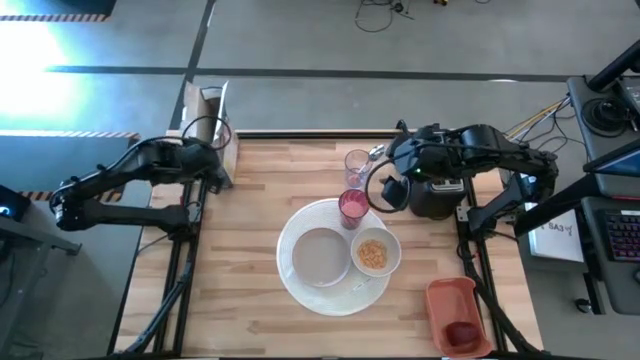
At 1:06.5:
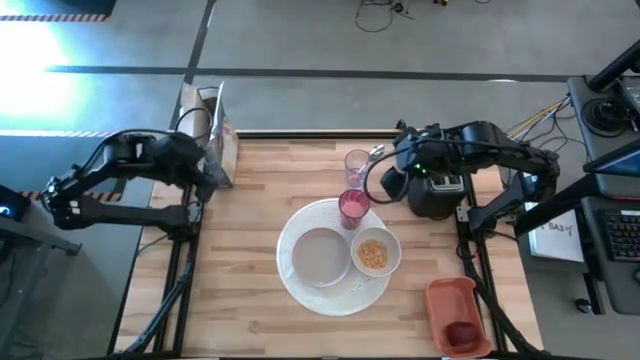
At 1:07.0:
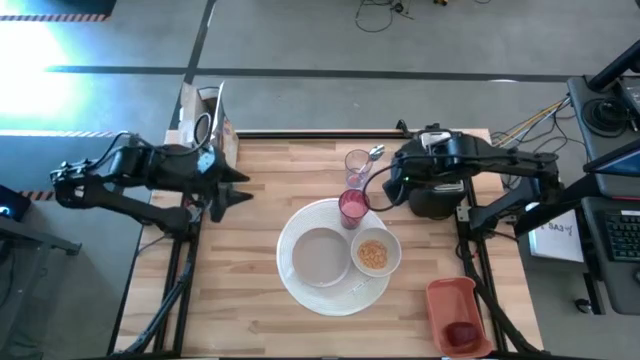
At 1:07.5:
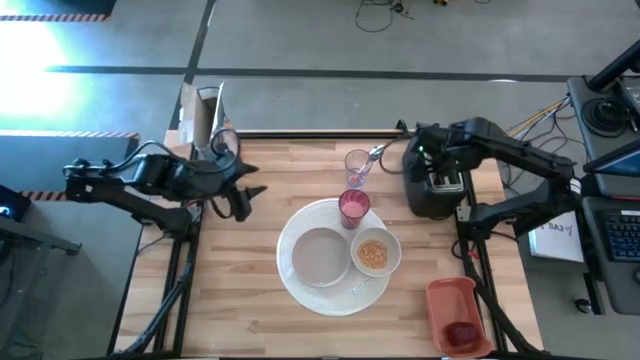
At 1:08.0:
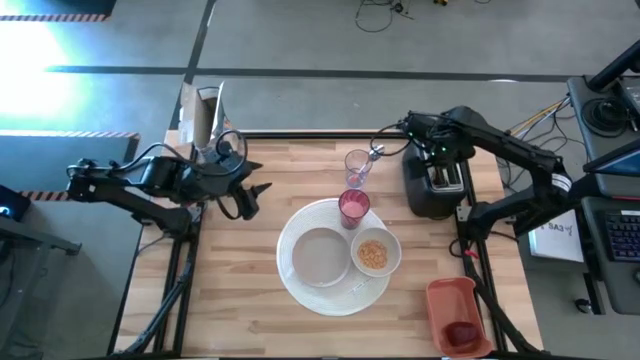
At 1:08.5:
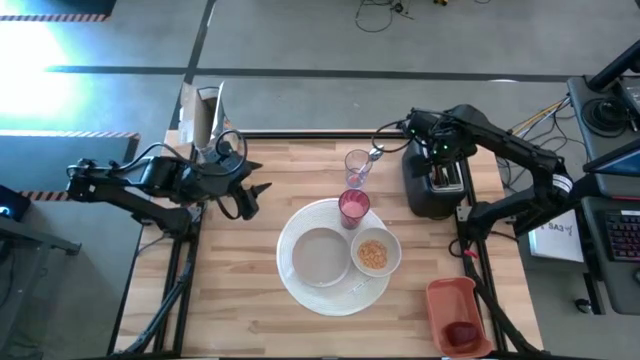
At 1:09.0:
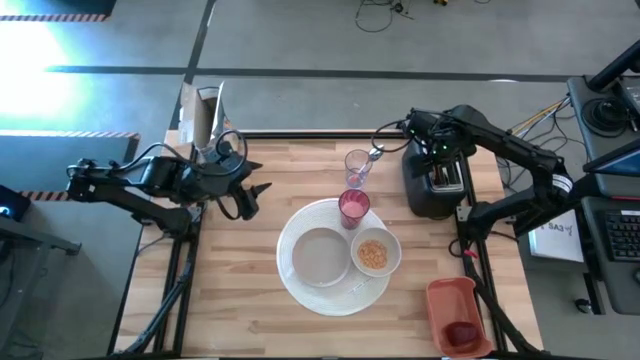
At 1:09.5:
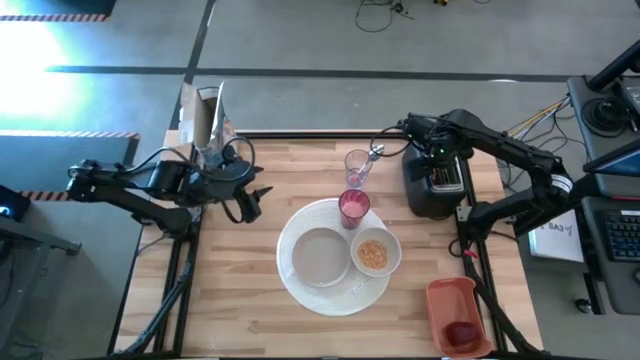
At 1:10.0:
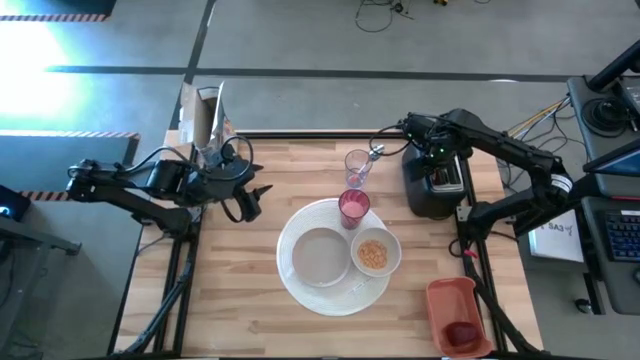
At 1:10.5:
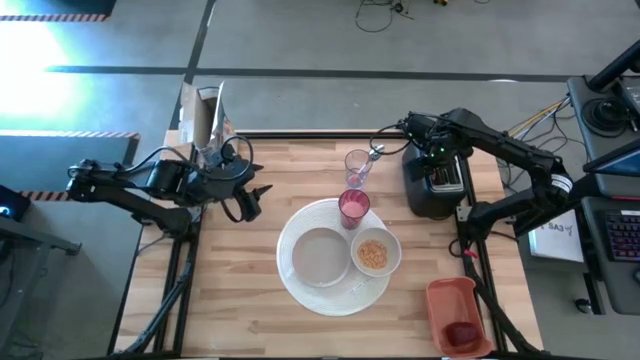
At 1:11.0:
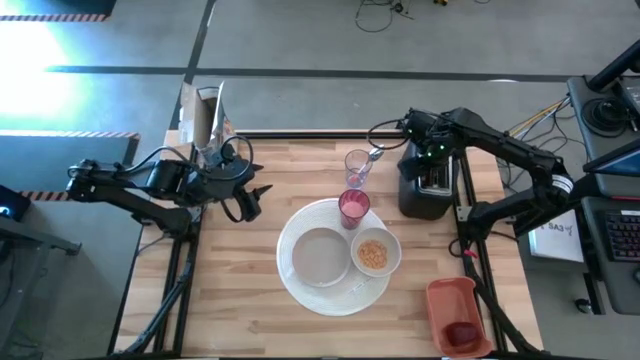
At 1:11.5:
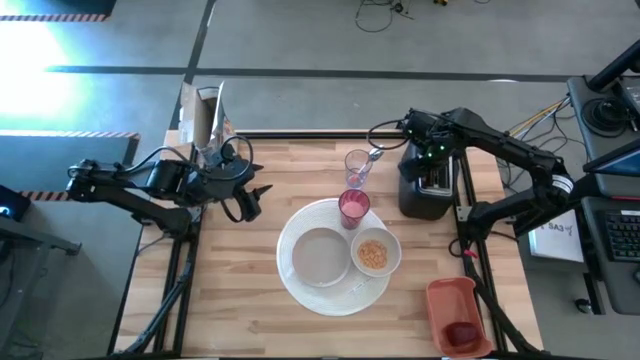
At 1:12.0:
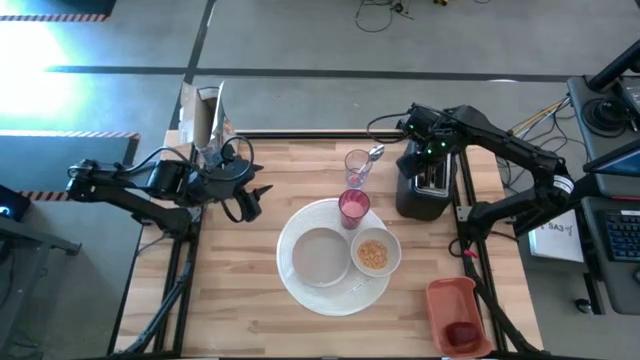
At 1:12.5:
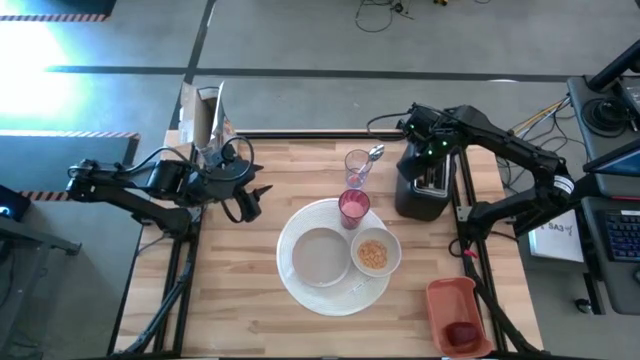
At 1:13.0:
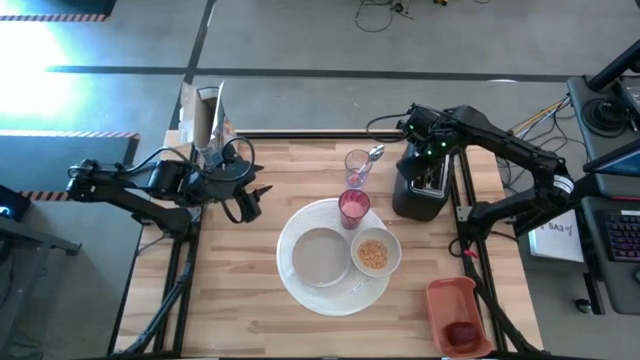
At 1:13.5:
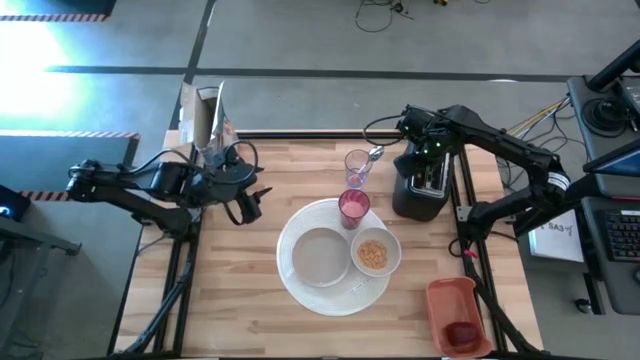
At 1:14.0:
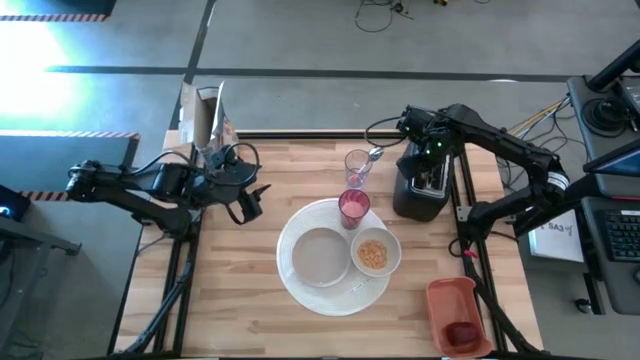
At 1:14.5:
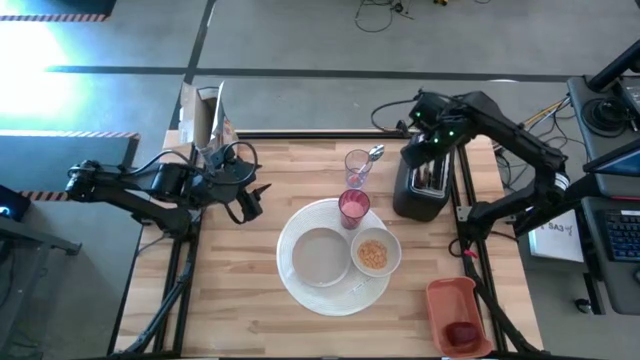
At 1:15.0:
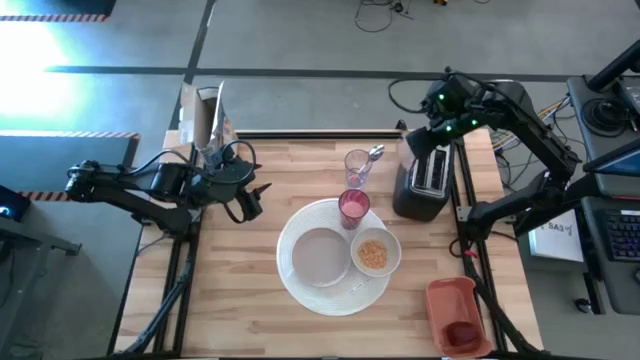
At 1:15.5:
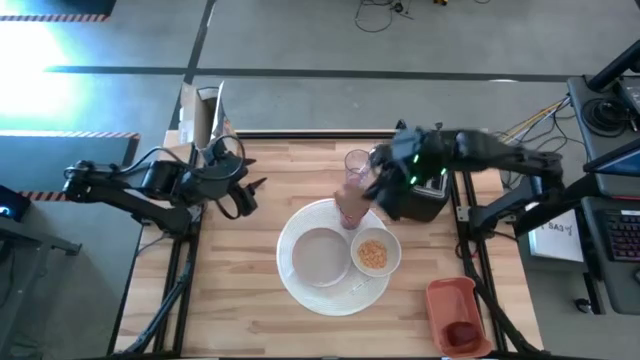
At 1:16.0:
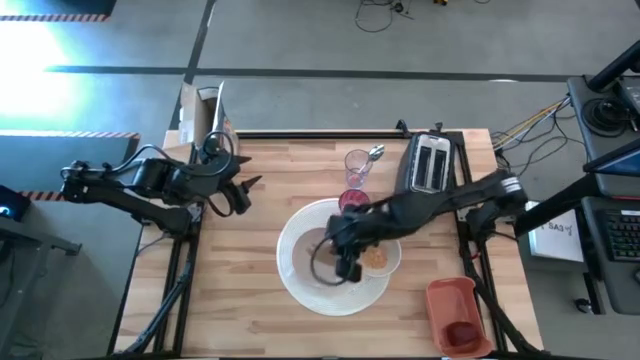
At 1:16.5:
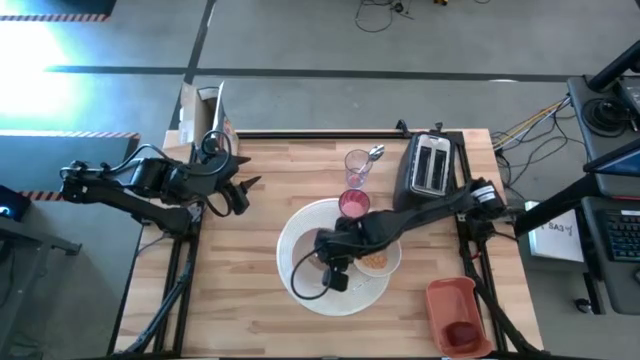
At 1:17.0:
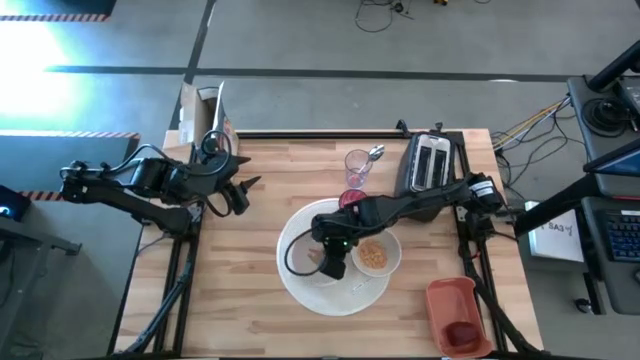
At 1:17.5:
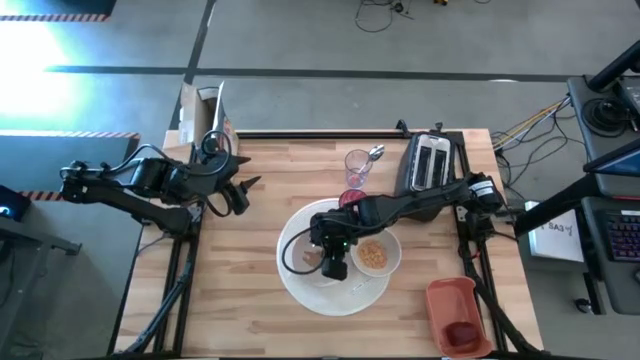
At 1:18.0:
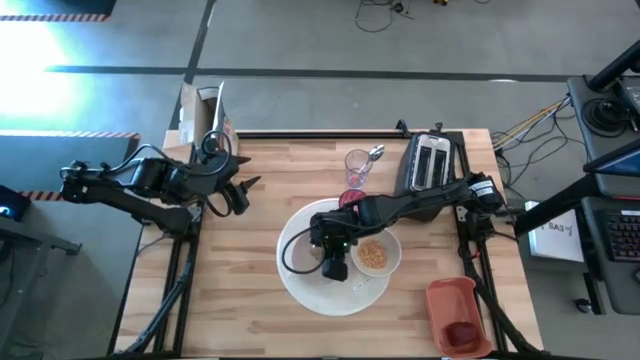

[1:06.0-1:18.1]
Task: Arrange a breakfast setting
Put the bagel from the toaster on the gray plate

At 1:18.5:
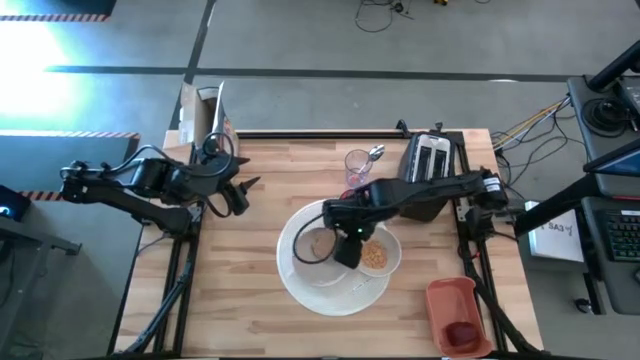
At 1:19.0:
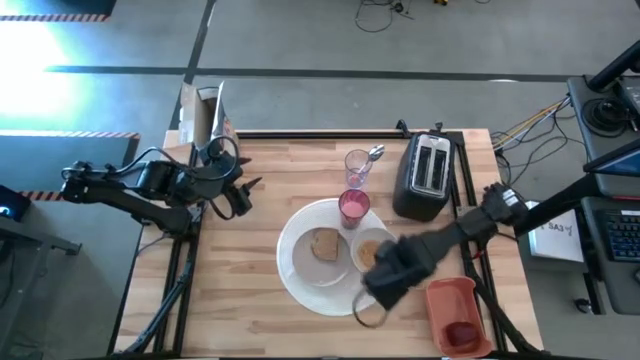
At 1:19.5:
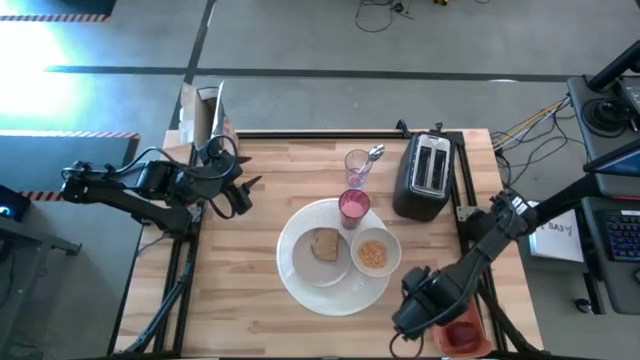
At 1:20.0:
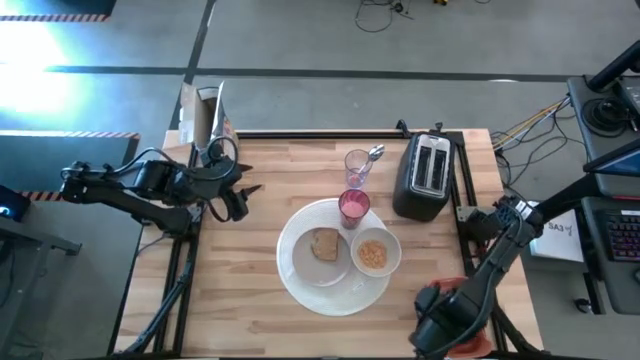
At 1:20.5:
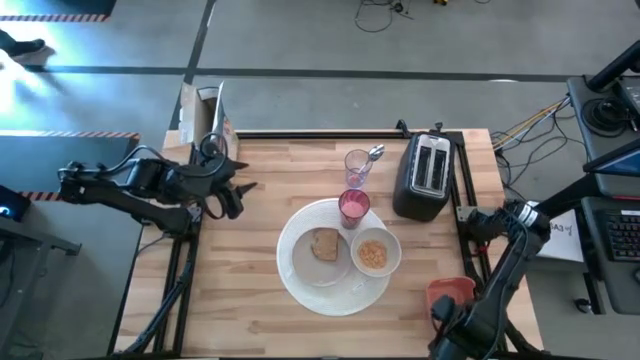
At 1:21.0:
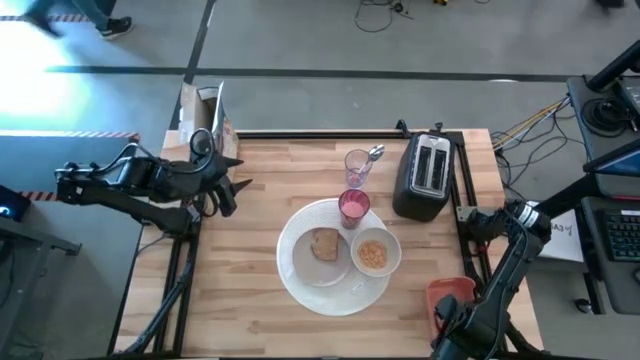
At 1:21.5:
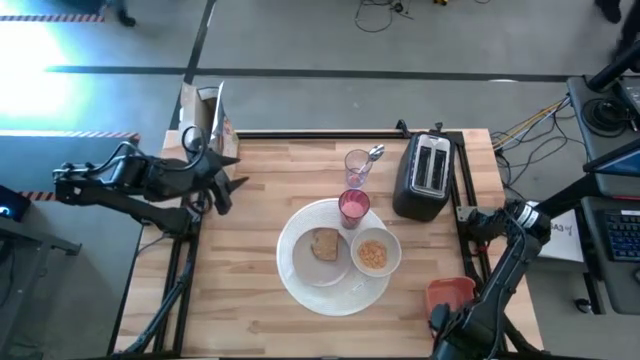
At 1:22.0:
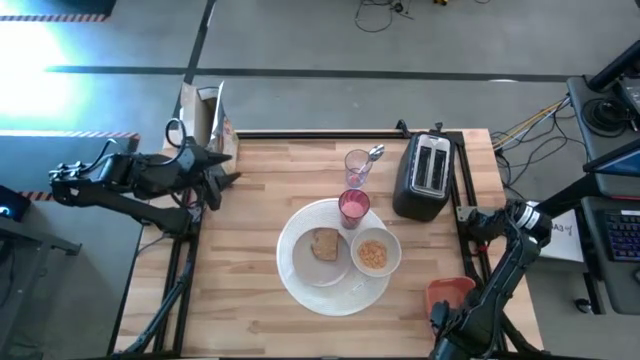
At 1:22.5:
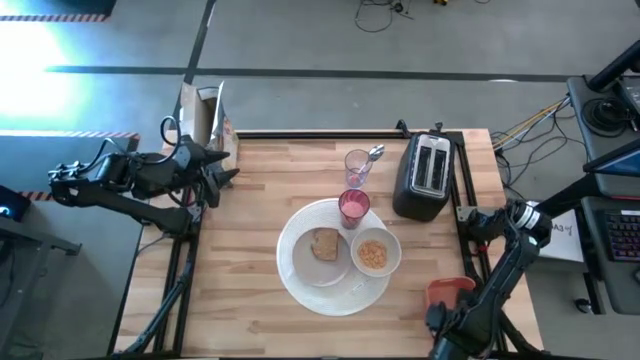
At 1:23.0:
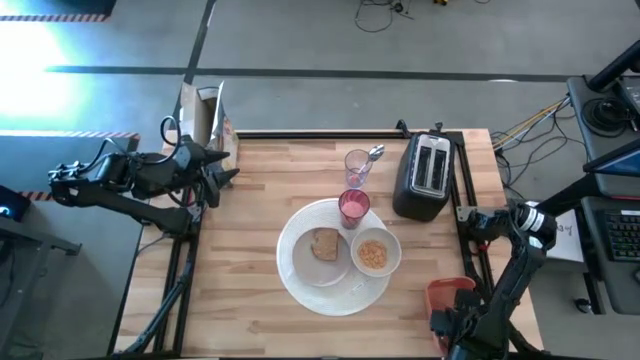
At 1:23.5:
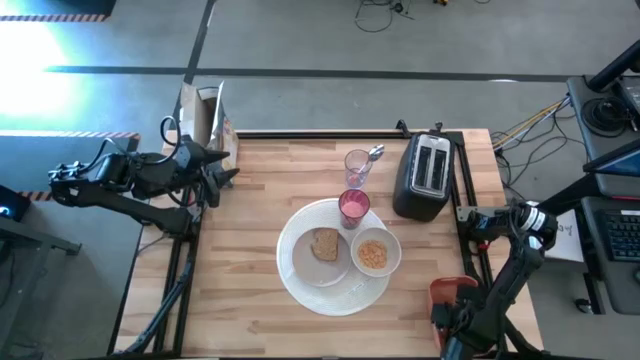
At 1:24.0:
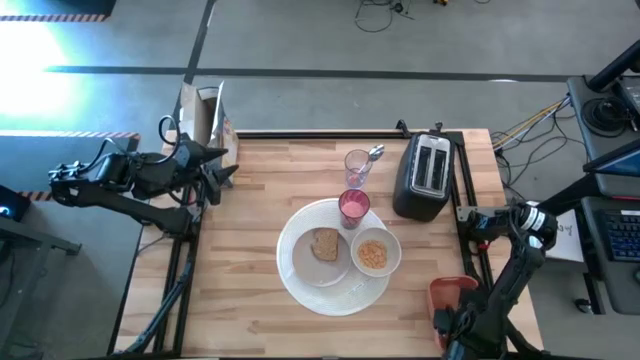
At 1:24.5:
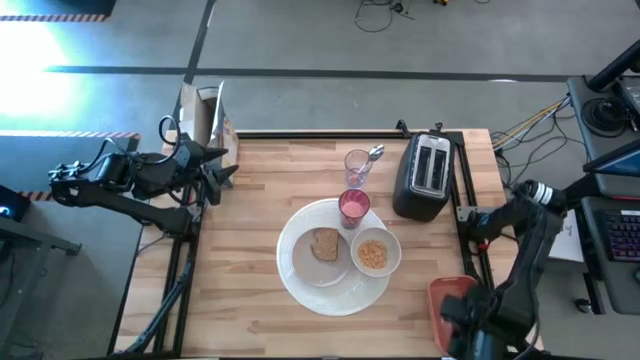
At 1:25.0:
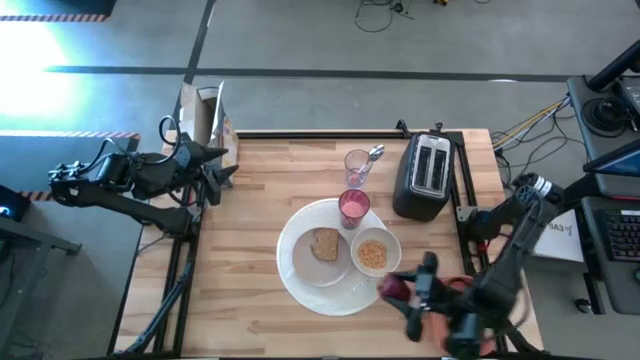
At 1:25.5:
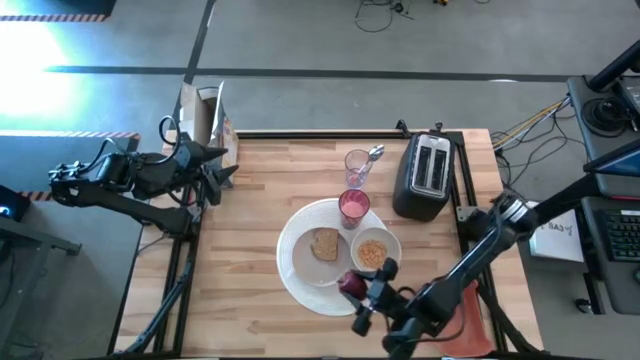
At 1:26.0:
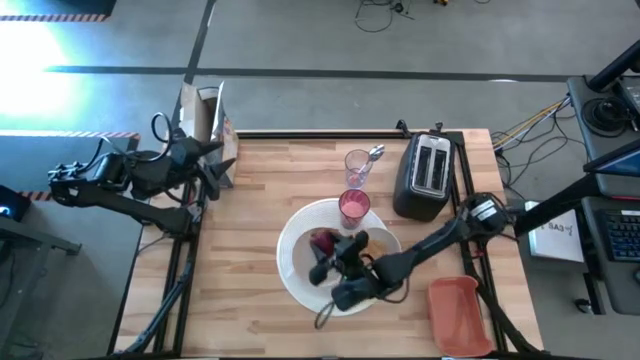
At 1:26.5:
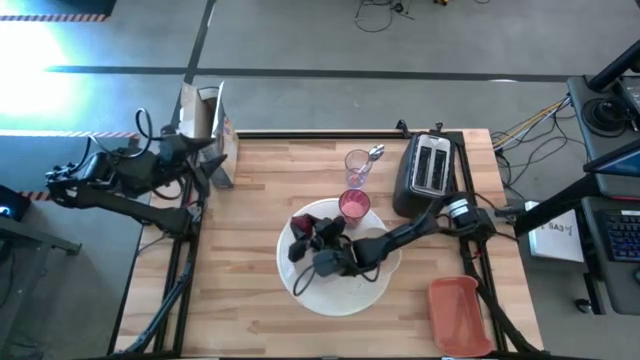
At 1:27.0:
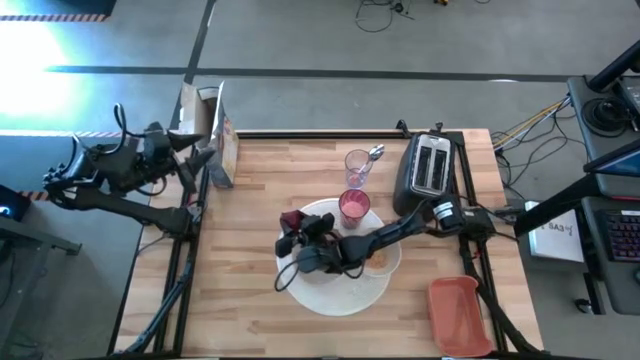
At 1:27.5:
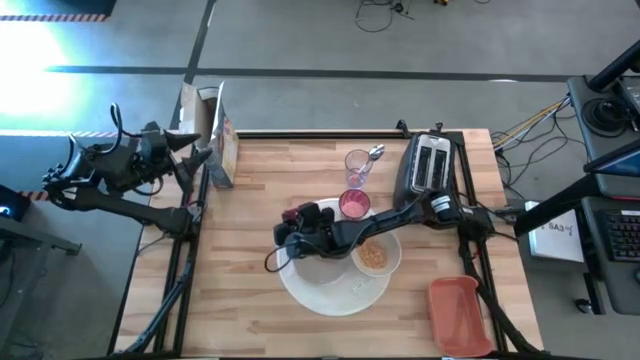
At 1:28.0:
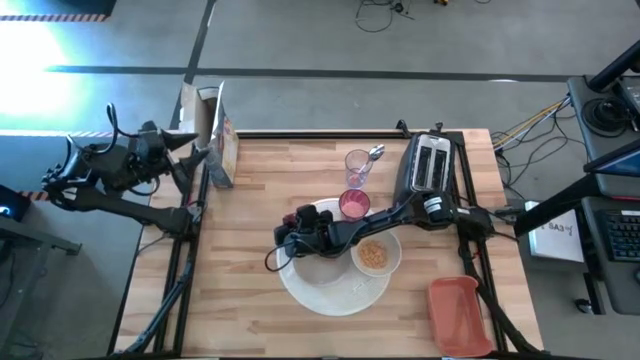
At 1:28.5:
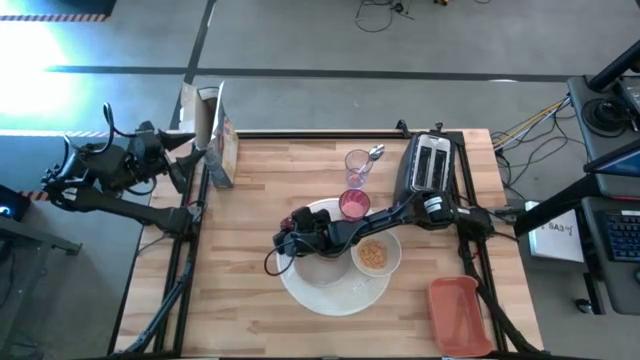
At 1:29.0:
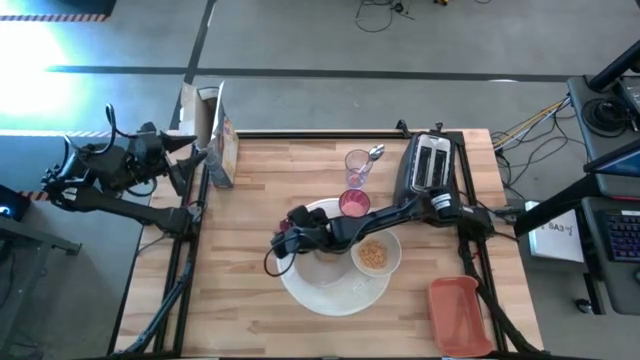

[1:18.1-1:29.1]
Put the apple from the orange bin on the white placemat to the left of the gray plate
